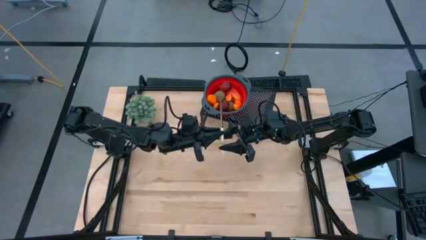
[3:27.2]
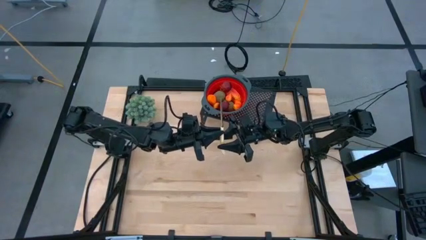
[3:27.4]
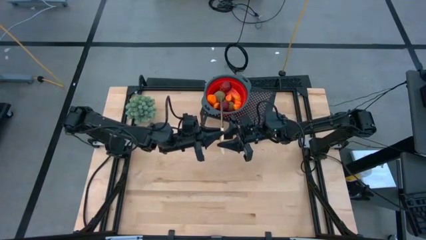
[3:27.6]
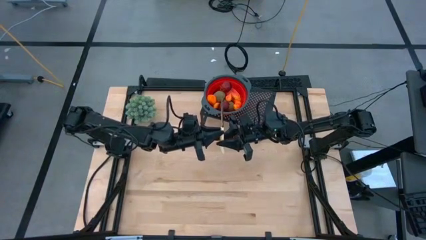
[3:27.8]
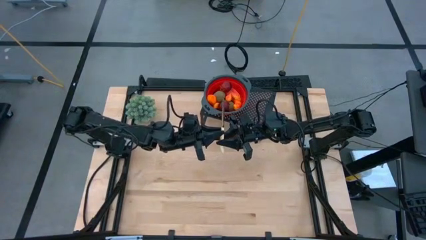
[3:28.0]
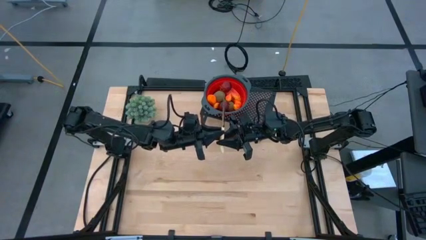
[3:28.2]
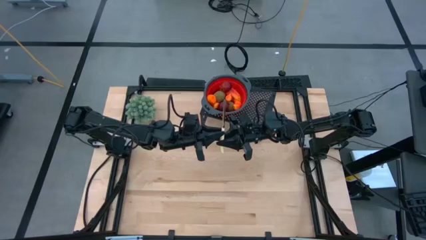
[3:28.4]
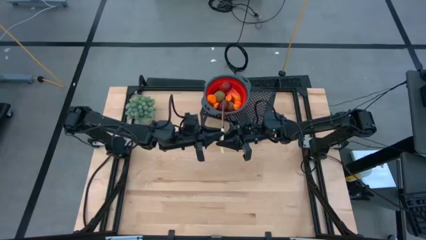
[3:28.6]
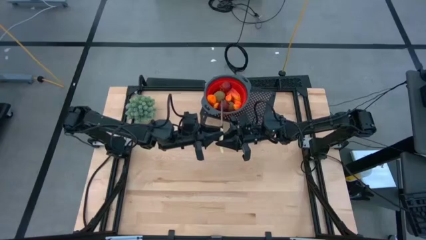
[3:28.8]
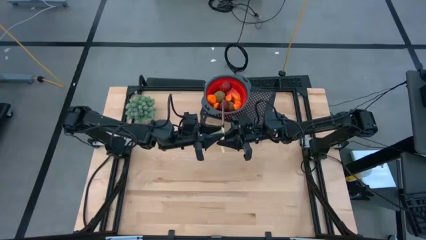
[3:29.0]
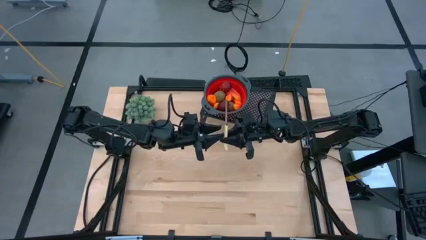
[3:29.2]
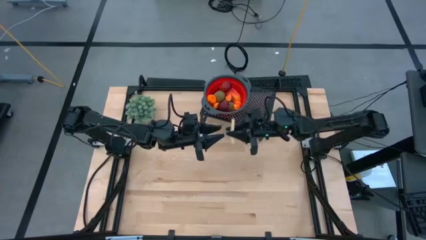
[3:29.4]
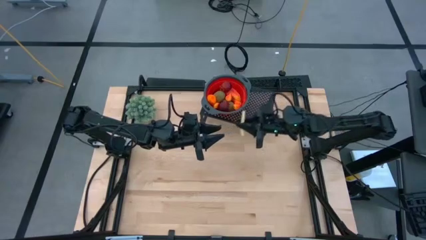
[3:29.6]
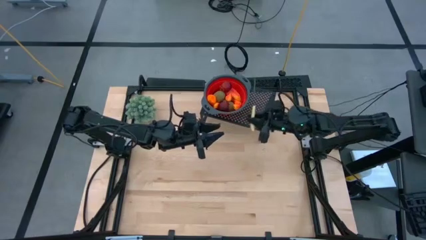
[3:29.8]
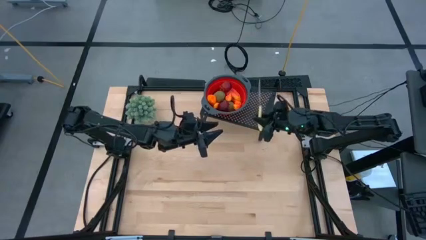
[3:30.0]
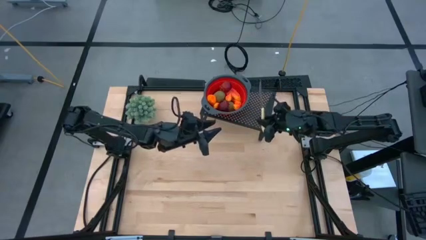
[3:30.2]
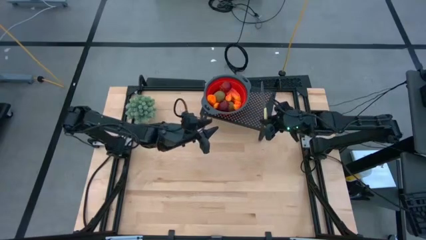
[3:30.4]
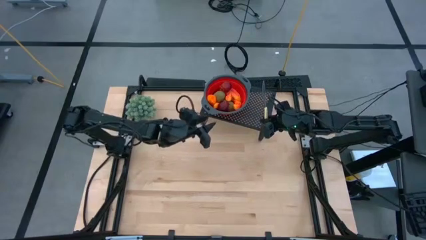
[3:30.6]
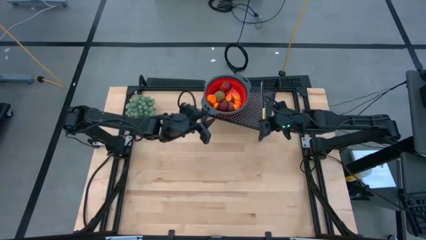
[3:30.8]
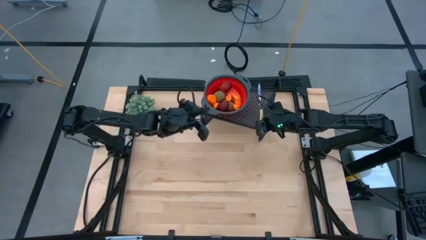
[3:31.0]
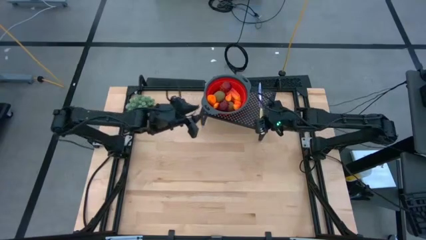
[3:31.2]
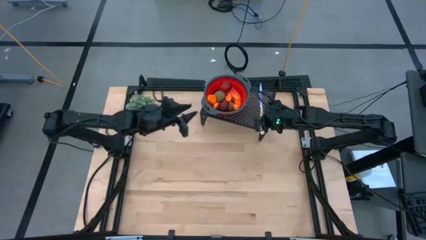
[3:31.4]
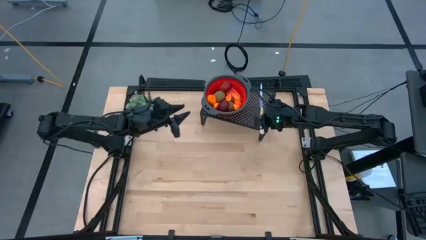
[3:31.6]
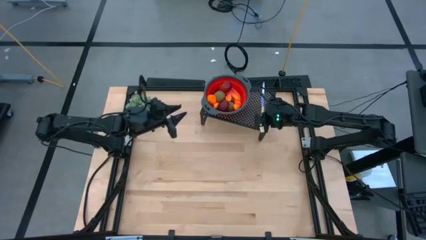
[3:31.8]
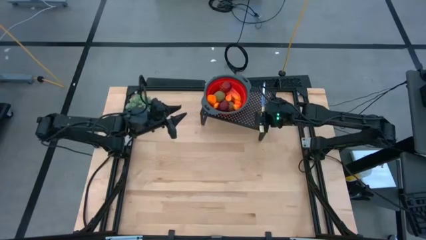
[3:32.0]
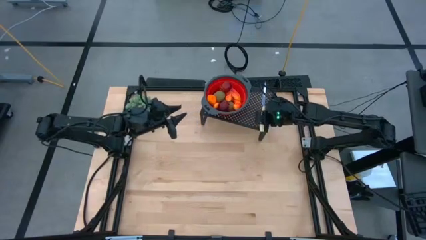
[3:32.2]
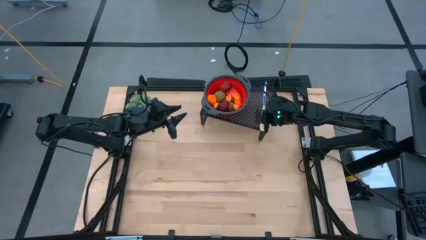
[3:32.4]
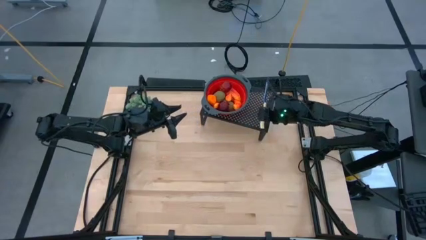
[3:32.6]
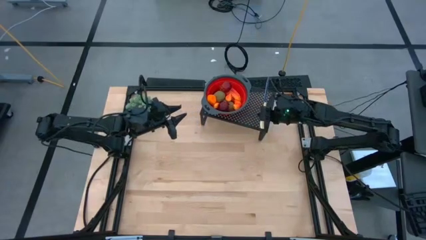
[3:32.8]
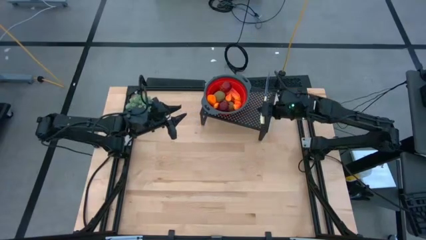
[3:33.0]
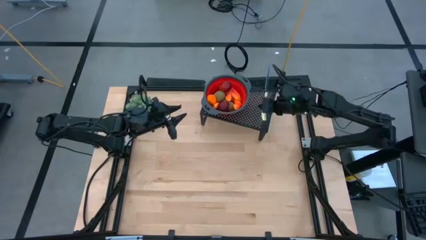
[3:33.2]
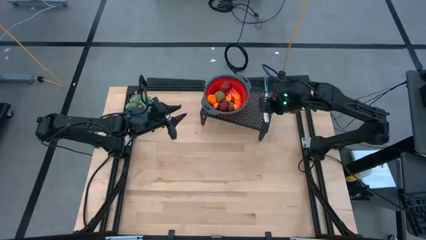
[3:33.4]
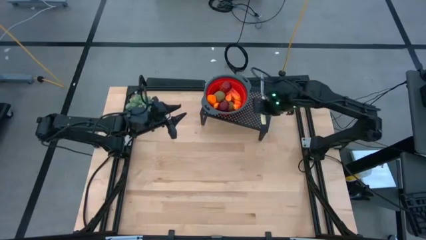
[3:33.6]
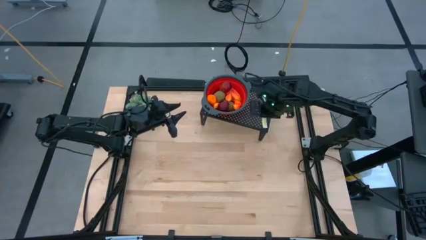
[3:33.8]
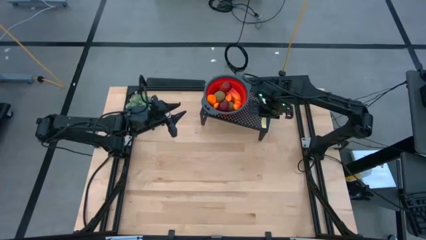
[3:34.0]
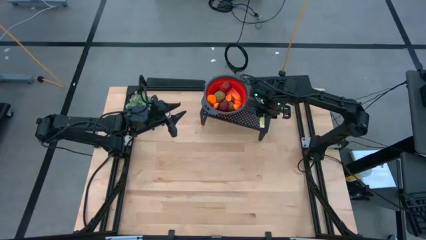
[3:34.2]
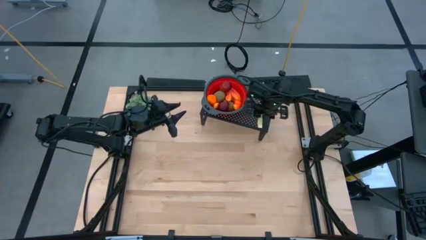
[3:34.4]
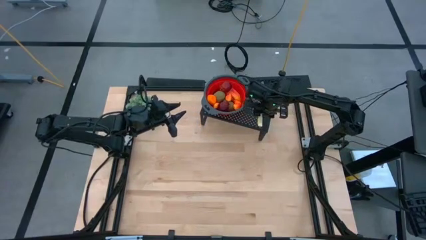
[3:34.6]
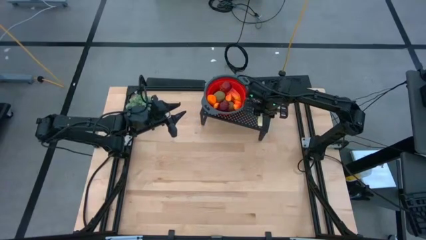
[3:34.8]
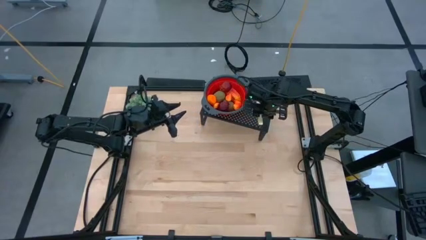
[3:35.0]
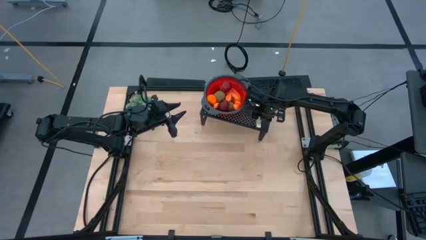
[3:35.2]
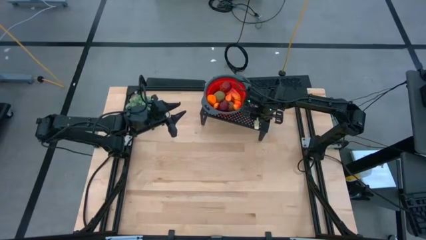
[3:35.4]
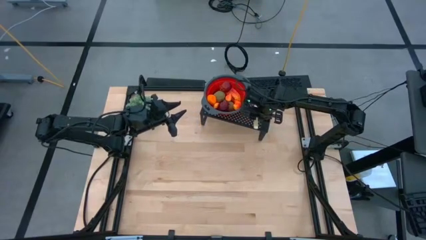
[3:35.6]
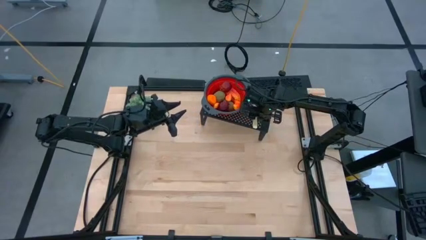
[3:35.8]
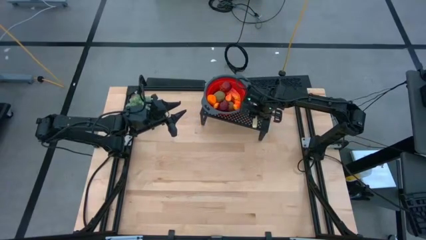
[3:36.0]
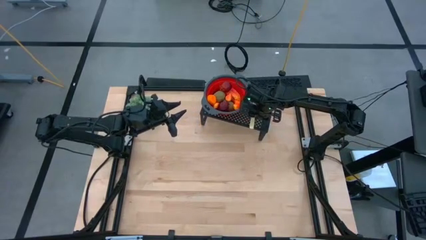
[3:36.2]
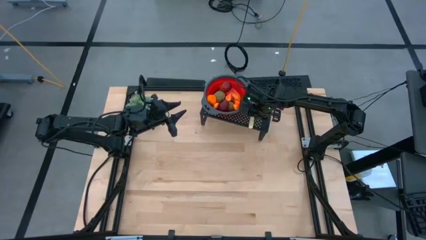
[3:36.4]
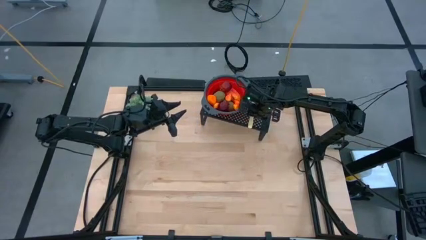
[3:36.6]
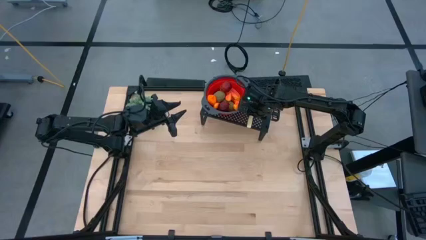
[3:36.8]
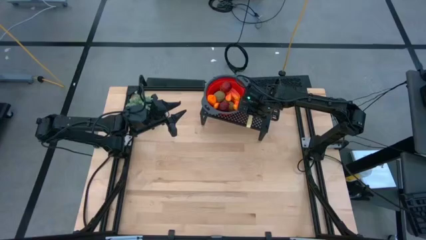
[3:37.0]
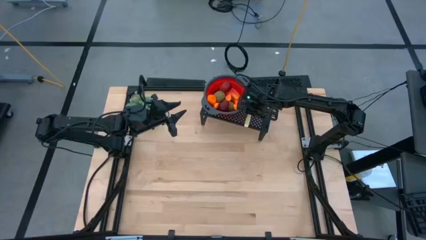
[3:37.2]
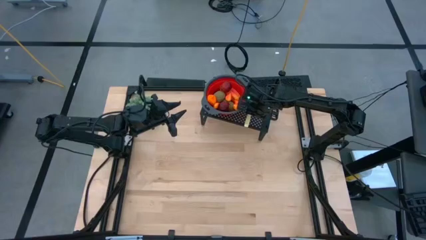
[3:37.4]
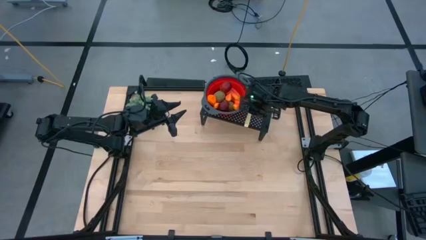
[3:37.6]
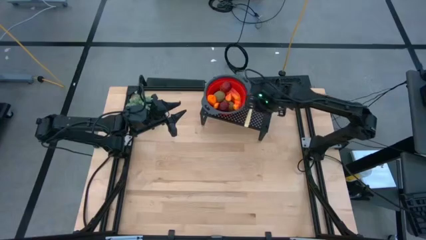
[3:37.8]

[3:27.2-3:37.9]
Task: Pick & Place Fruit
Put the white table knife on the shelf

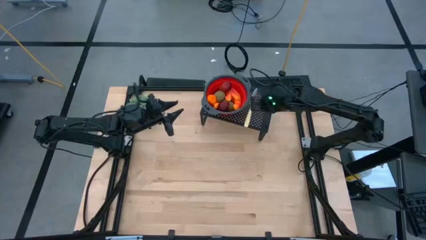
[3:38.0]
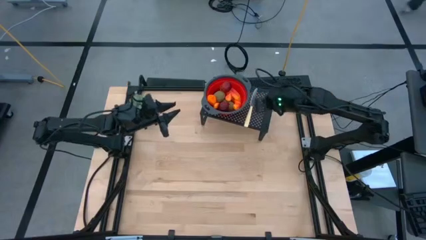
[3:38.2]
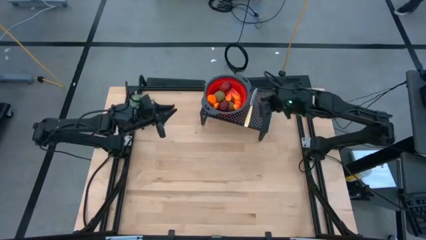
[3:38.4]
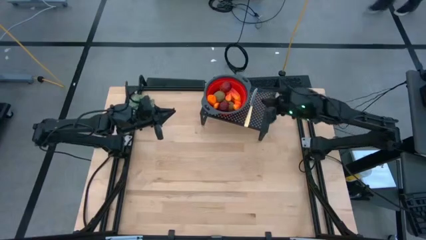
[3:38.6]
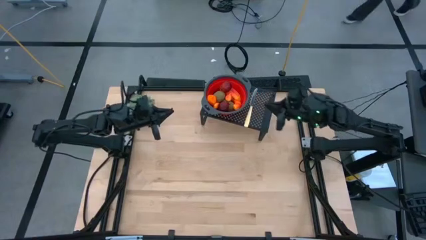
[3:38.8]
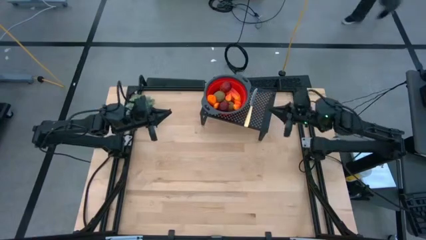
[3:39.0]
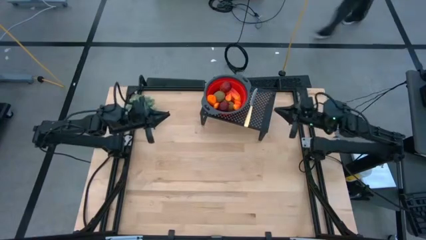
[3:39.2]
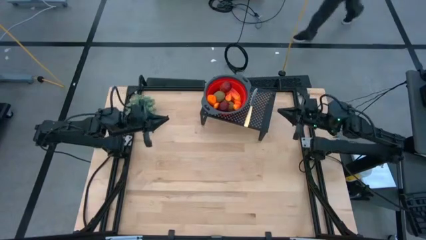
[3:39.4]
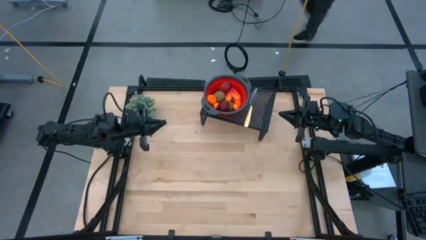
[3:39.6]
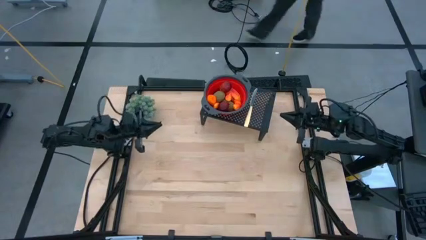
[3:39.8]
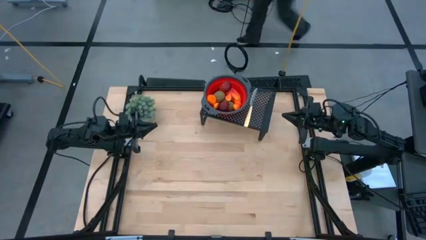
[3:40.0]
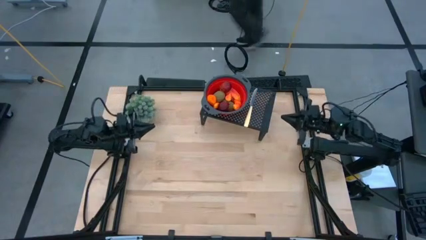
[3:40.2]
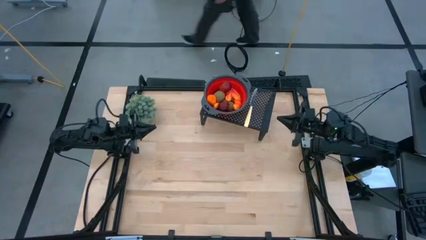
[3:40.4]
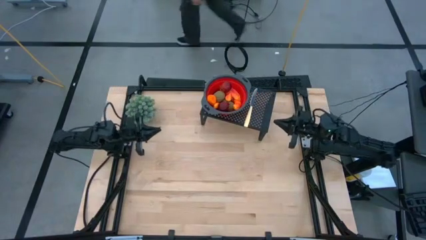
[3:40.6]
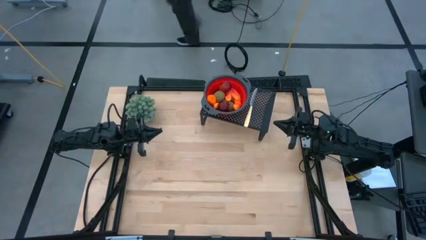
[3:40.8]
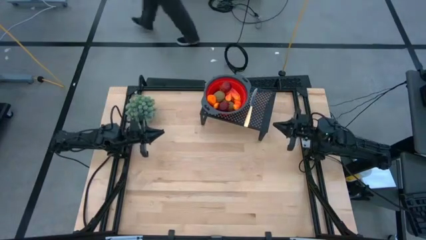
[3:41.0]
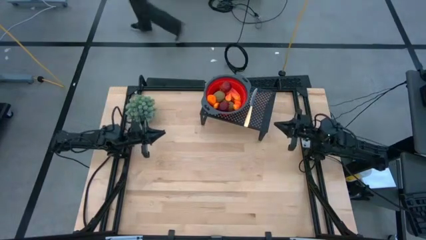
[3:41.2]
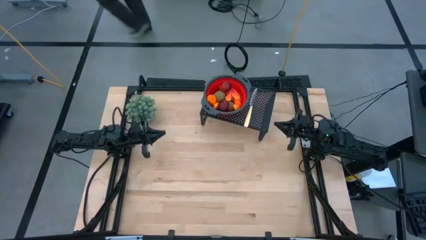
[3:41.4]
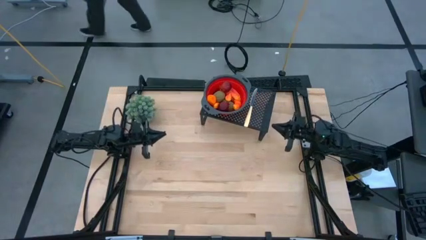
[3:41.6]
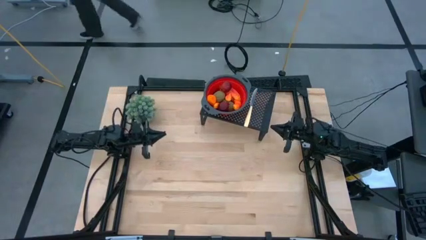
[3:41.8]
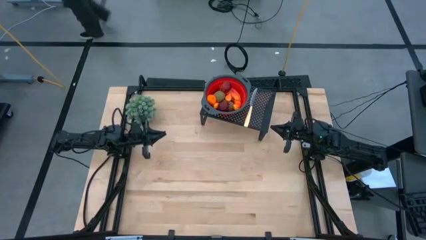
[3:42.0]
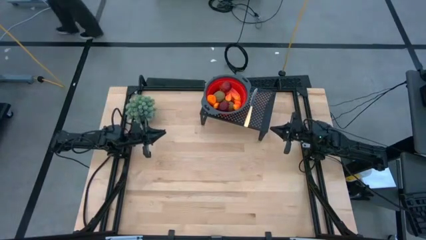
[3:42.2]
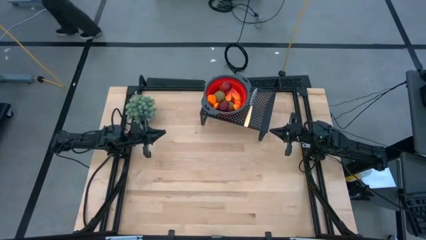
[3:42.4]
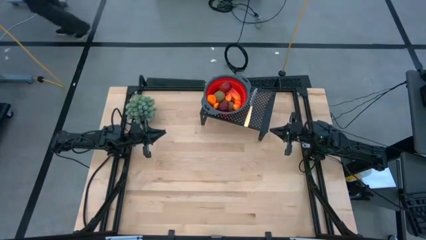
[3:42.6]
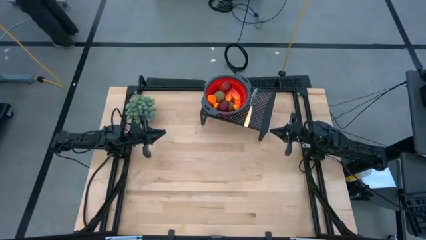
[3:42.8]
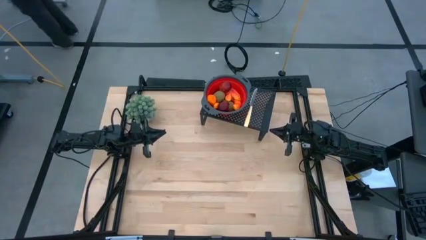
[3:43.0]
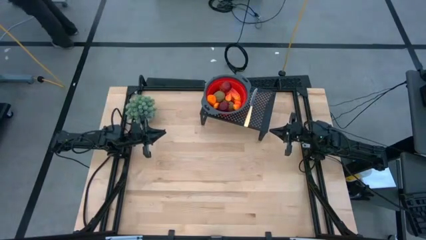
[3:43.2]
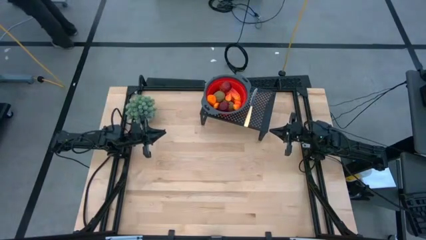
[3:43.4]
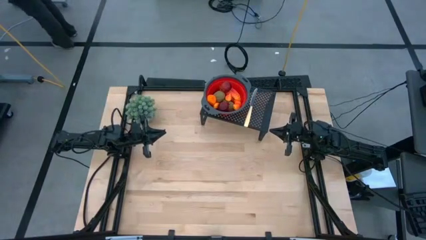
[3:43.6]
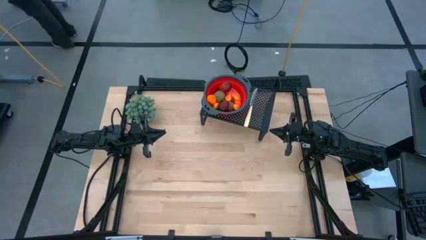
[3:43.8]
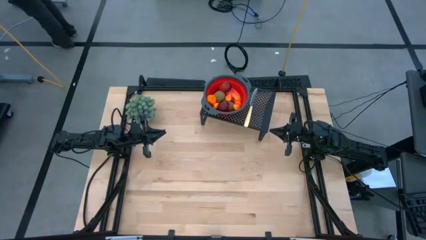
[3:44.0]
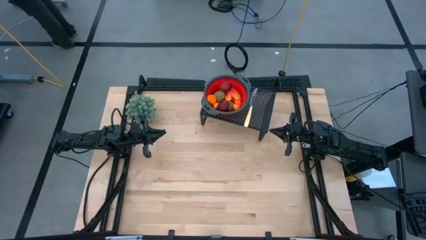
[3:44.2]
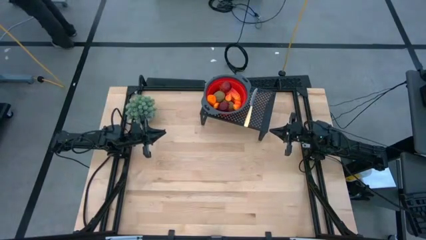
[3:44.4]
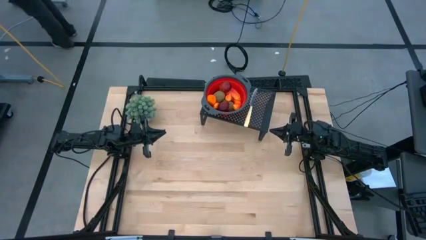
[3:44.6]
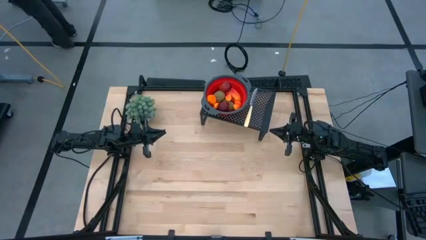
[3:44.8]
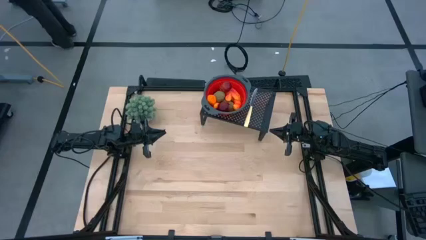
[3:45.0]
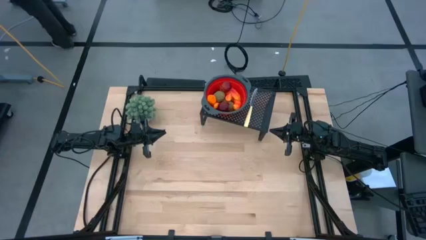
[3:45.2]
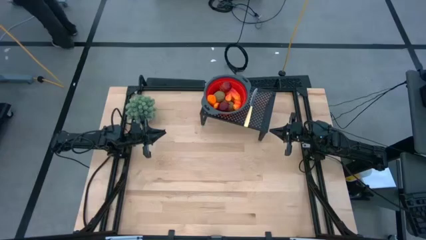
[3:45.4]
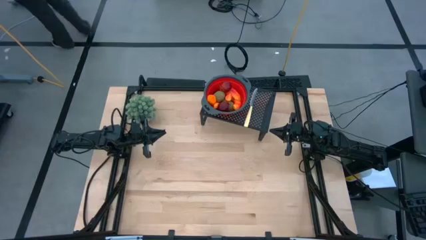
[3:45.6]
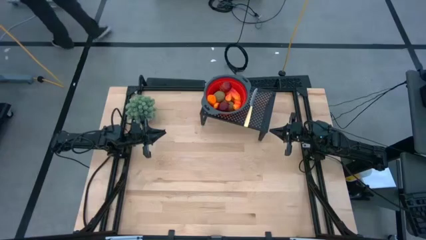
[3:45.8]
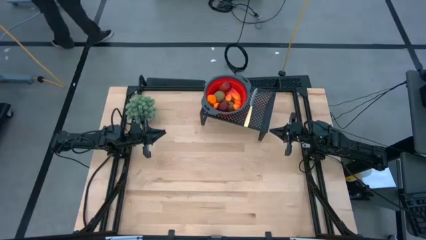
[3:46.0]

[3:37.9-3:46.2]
Return to Home Position
